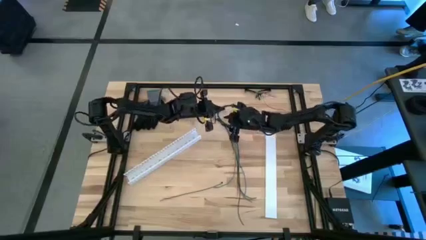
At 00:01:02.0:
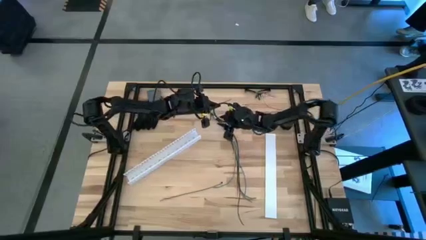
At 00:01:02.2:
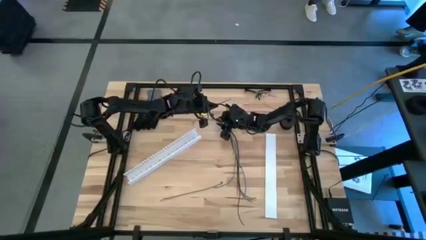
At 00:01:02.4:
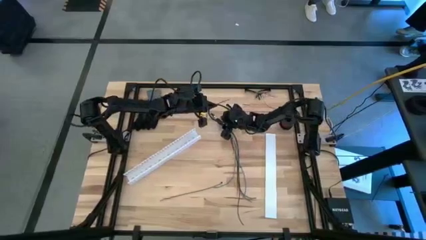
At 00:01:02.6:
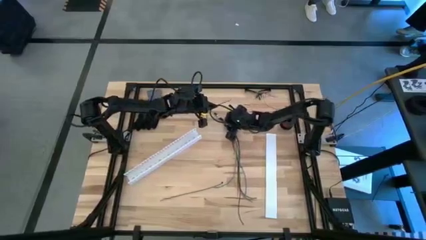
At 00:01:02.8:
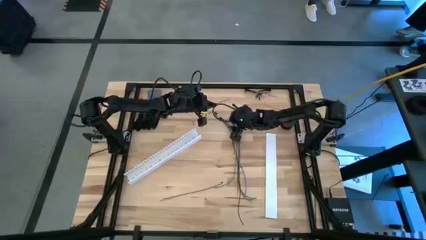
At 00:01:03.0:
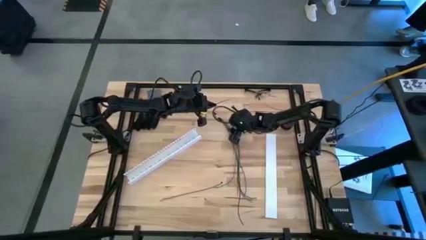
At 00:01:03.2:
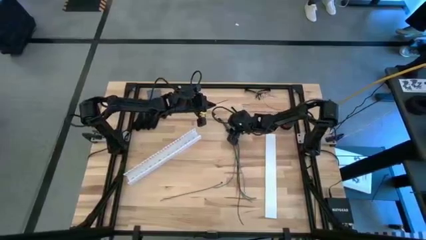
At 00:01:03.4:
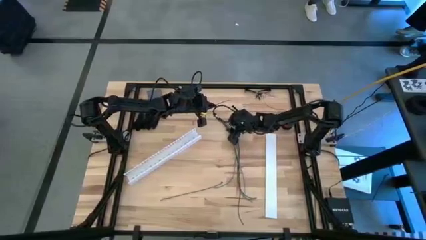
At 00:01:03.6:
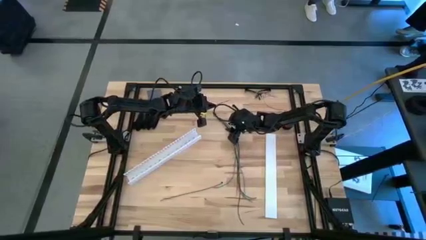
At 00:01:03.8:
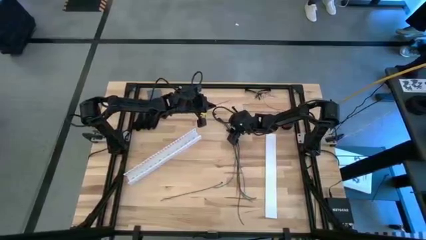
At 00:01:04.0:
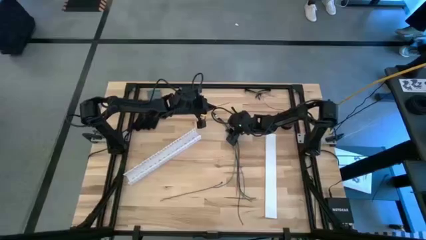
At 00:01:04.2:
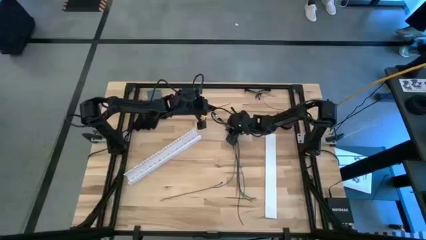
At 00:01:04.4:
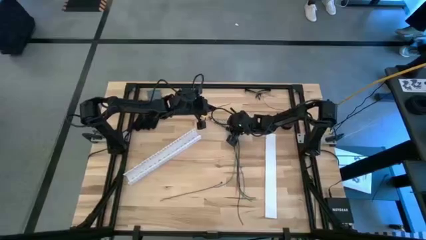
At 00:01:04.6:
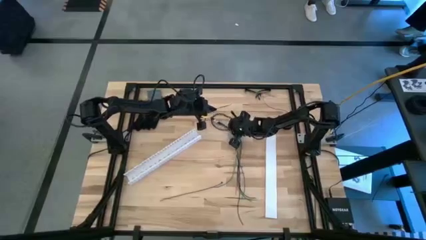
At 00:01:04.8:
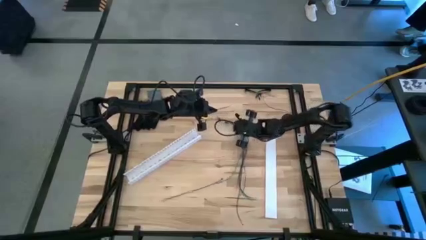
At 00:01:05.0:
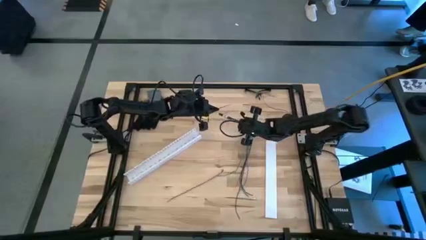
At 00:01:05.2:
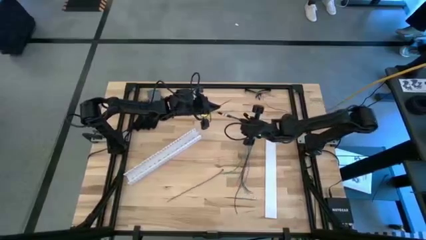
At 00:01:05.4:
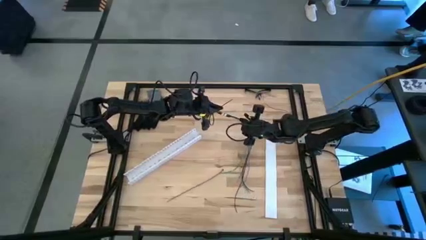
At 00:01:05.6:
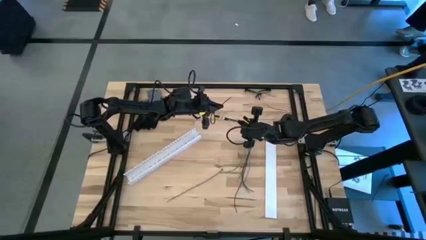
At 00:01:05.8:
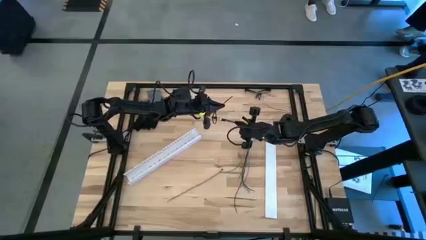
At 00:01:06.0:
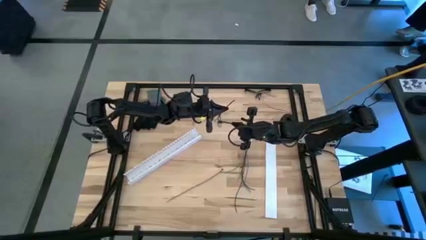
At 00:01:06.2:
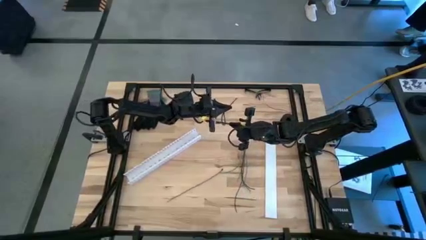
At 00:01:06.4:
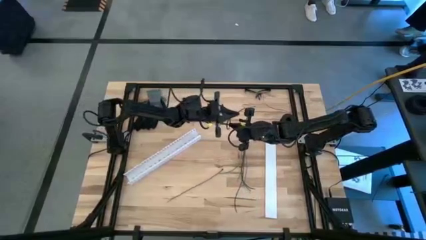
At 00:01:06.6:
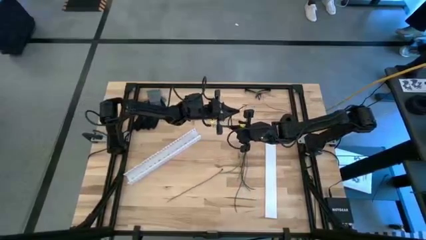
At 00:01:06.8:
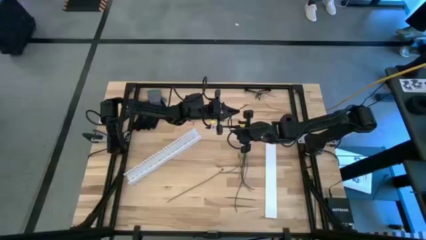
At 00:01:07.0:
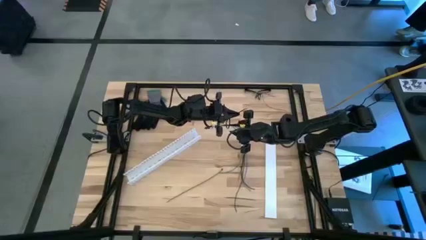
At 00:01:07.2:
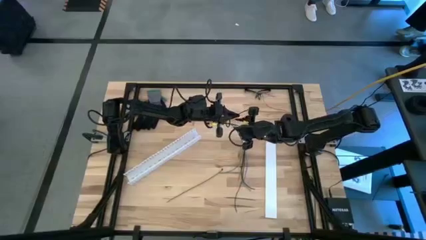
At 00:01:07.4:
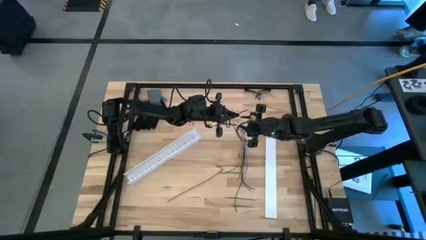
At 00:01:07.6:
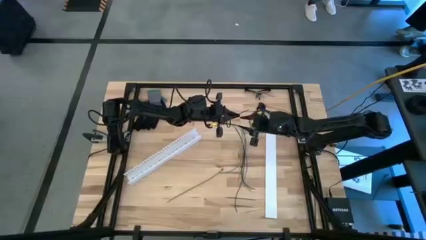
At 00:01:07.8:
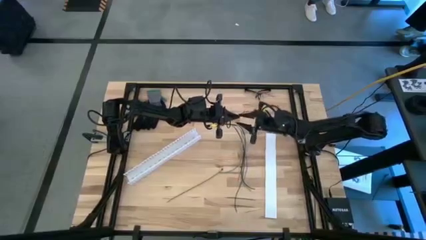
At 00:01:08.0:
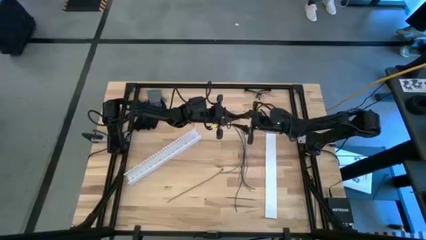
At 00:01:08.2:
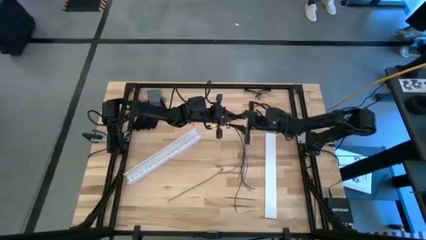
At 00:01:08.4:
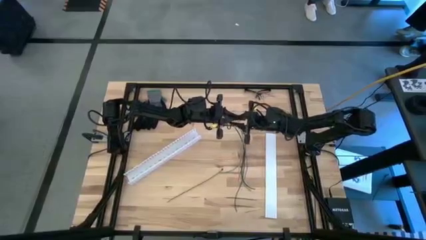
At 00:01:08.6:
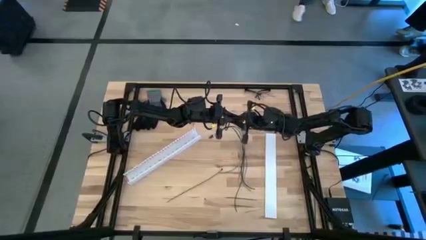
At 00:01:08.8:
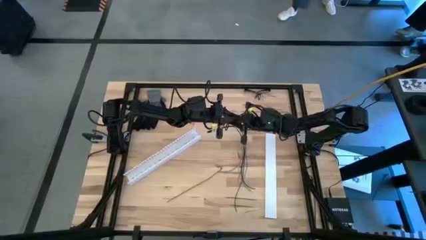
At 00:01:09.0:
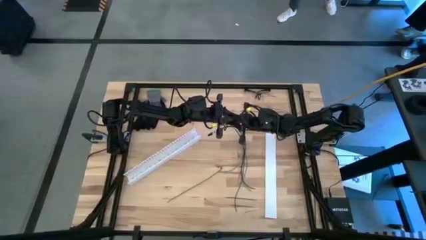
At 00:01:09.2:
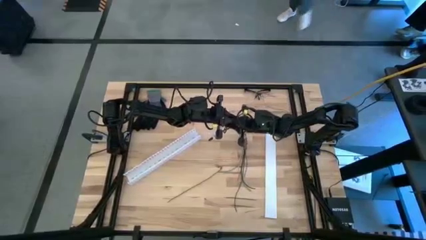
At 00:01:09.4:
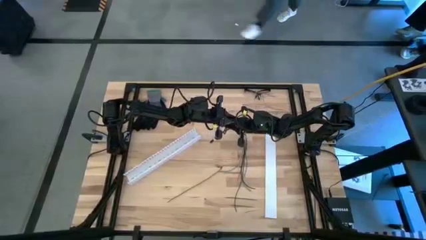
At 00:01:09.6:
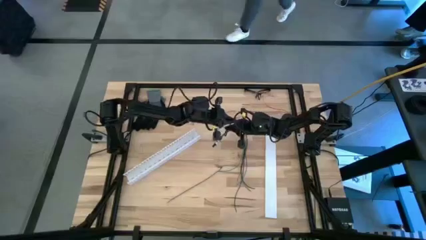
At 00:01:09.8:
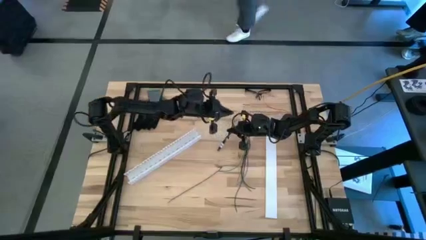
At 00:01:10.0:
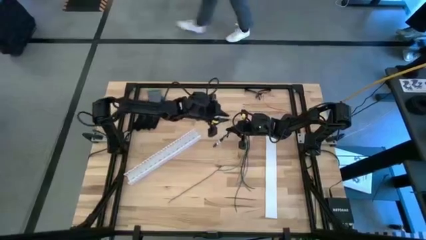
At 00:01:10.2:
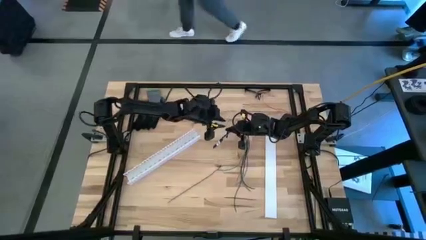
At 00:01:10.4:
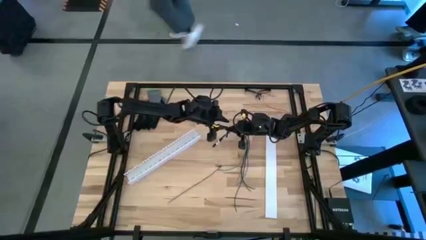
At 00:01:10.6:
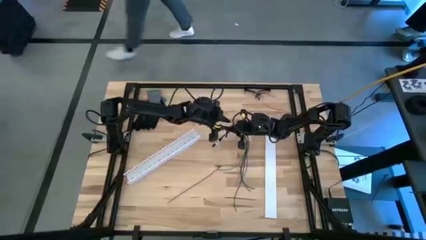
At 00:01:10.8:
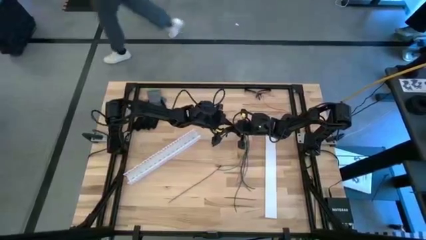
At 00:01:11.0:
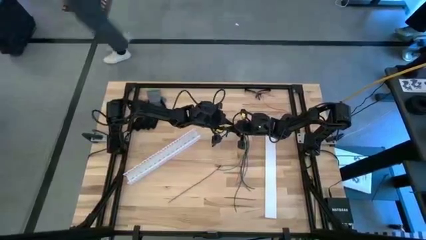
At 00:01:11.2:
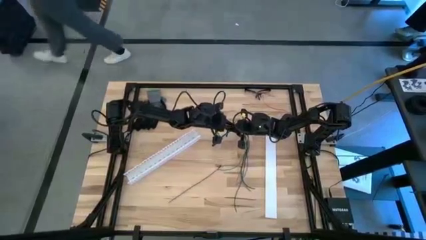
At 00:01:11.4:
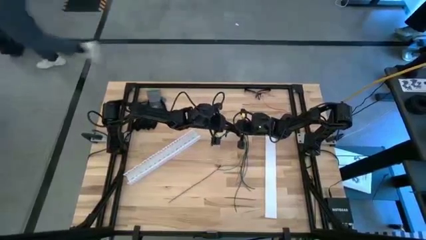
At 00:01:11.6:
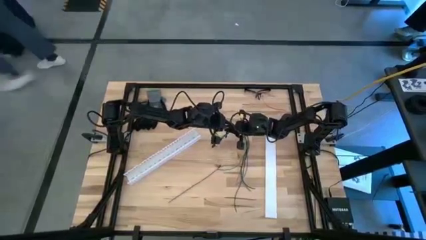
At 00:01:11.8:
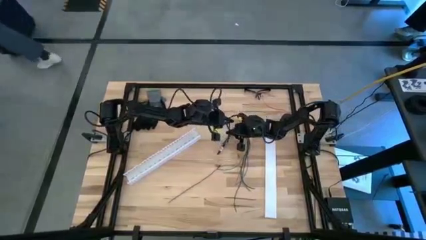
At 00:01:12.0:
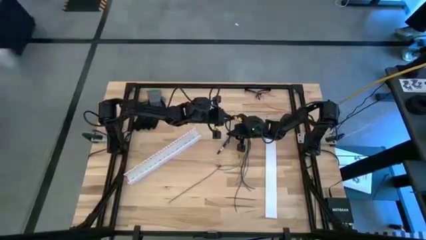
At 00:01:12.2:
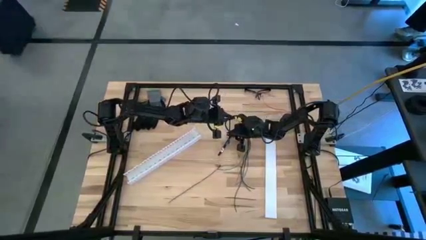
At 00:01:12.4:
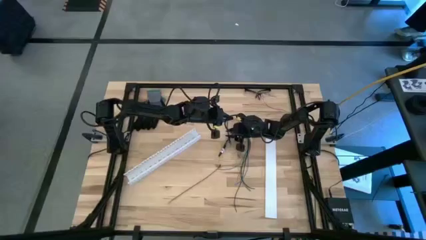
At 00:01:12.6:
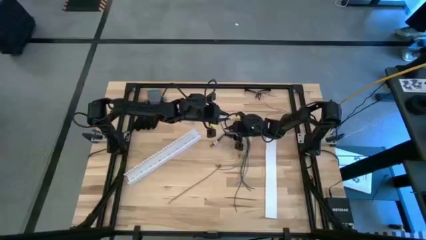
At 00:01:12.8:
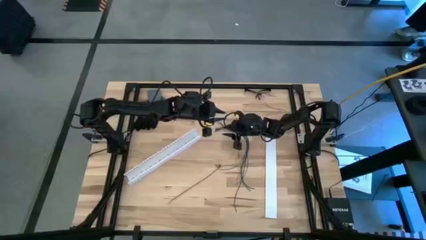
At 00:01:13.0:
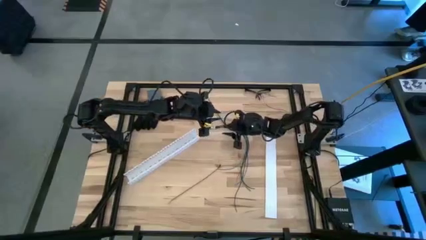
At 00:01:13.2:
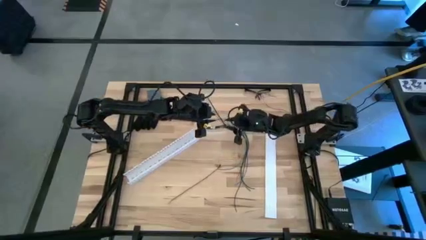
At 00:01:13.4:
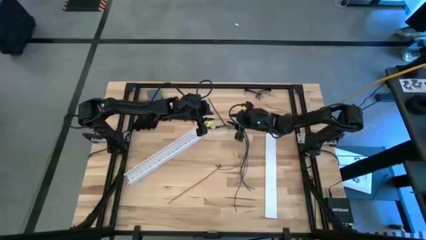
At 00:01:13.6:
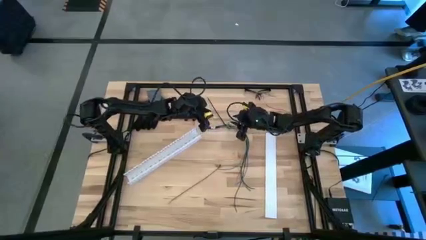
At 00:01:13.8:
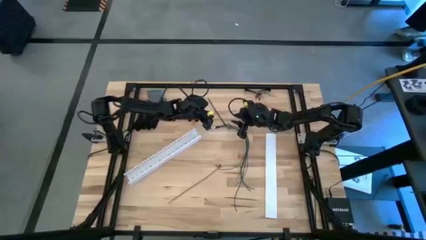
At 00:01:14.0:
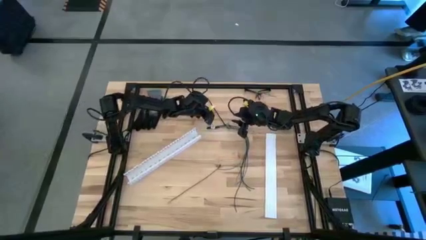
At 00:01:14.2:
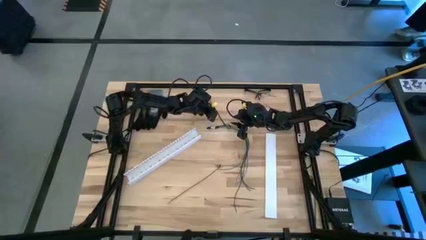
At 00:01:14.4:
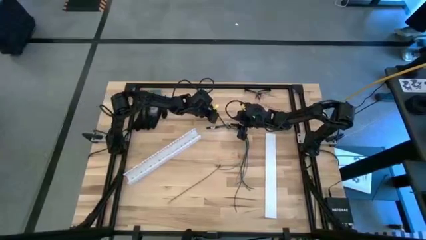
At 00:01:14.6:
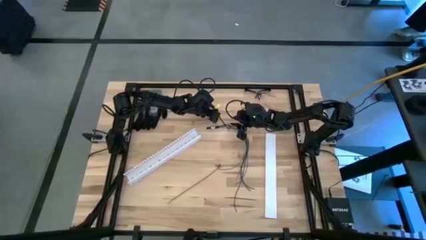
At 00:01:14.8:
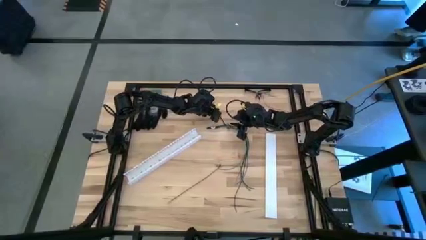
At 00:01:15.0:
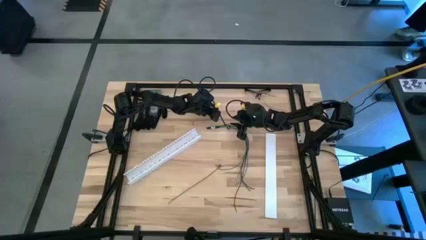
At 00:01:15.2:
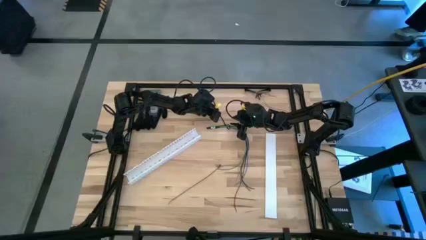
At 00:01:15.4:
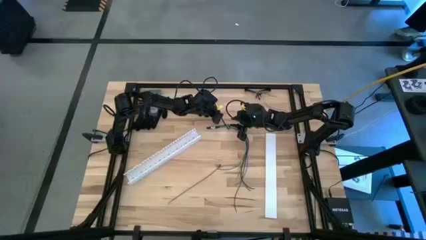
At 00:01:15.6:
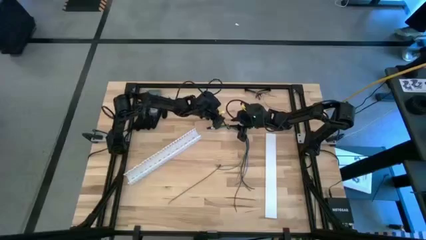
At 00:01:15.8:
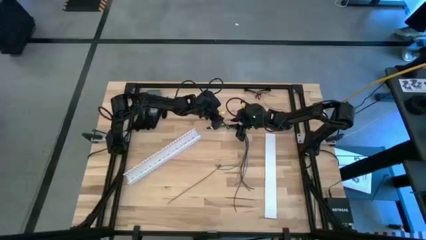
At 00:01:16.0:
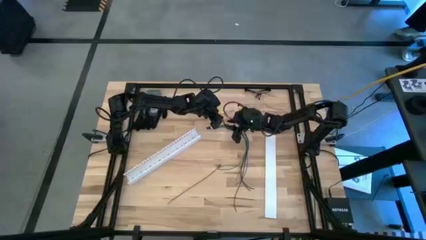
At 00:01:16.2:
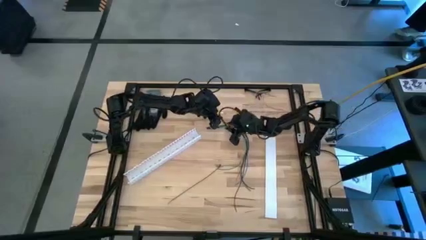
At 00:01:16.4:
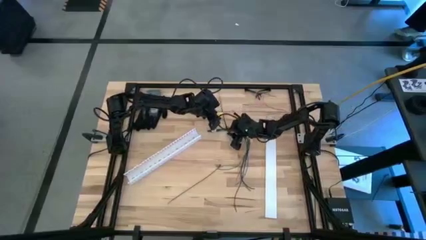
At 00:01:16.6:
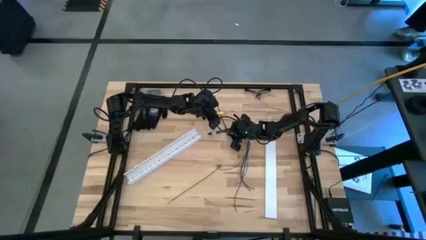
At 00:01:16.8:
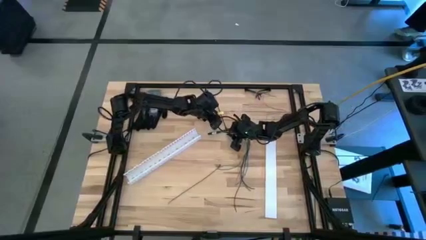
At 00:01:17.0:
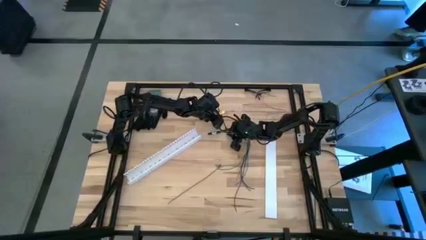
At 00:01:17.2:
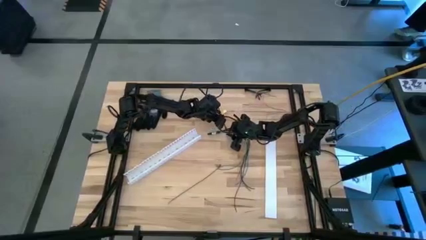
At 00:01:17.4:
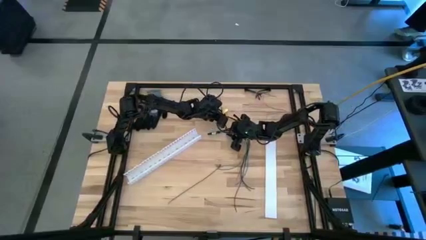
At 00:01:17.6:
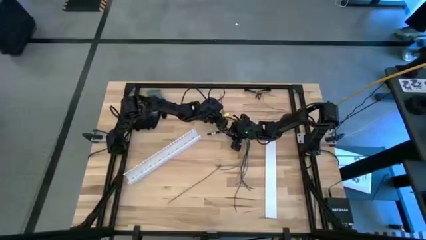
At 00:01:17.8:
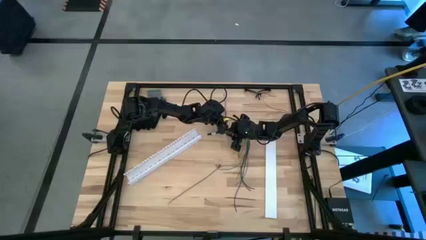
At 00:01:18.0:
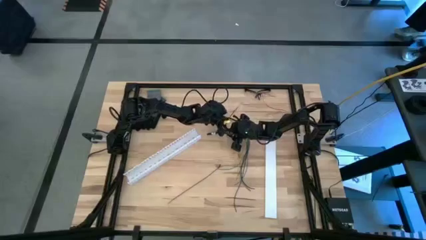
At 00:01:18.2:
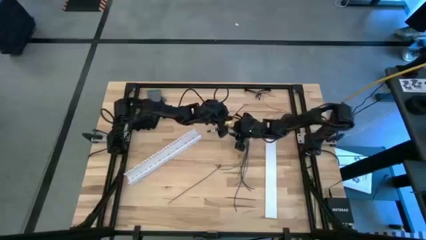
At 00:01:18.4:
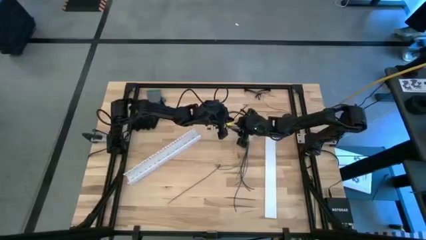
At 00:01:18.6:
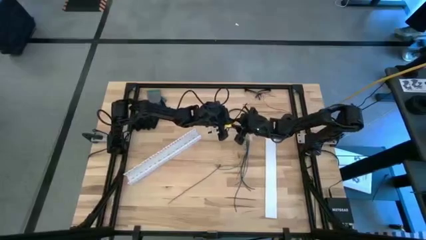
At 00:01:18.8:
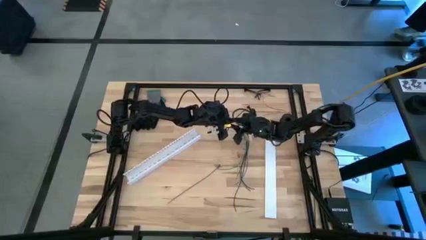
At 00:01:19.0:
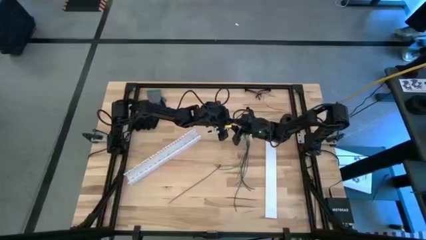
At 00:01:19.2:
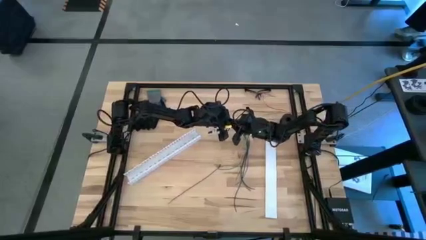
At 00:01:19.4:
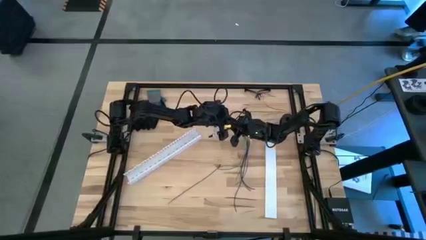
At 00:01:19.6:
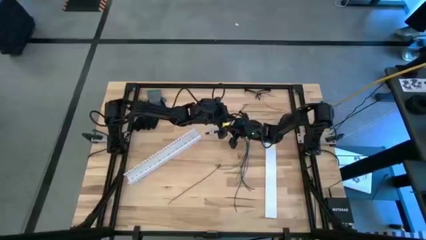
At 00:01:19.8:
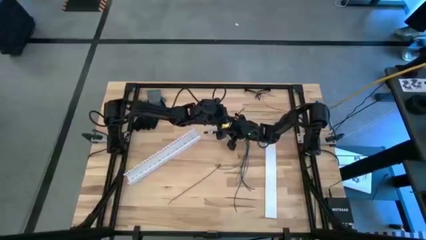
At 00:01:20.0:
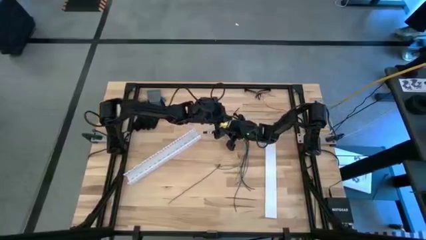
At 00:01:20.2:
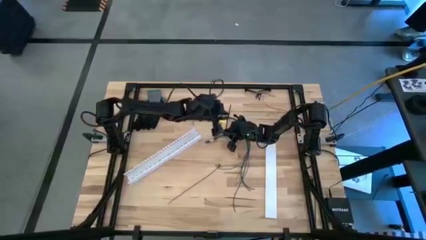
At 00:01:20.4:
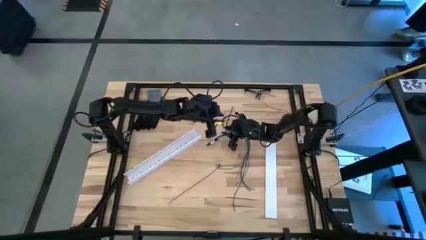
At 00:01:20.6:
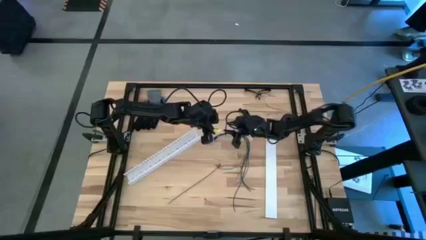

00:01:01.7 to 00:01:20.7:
Task: Ziptie cables
Wrap the top black zip tie on the colored cables
